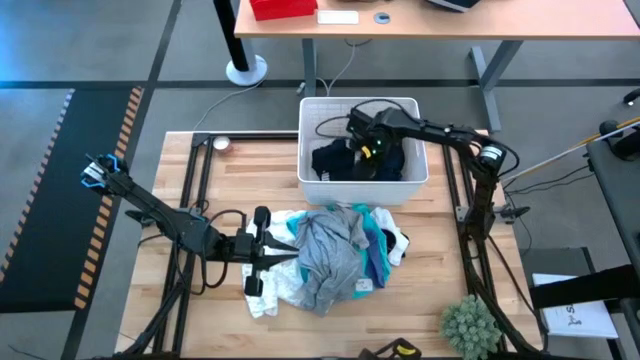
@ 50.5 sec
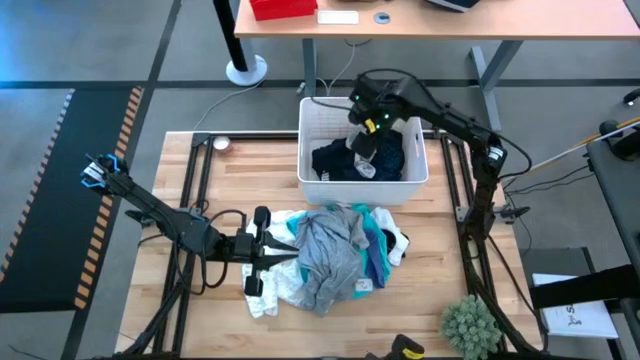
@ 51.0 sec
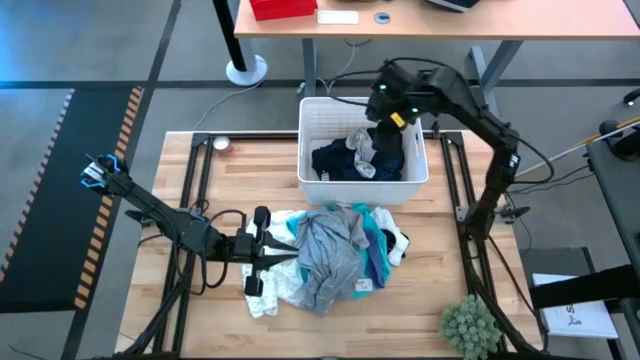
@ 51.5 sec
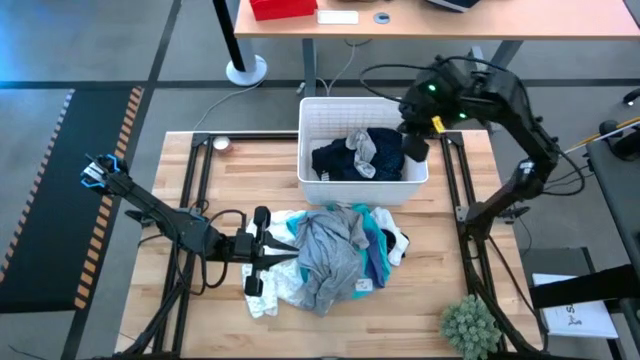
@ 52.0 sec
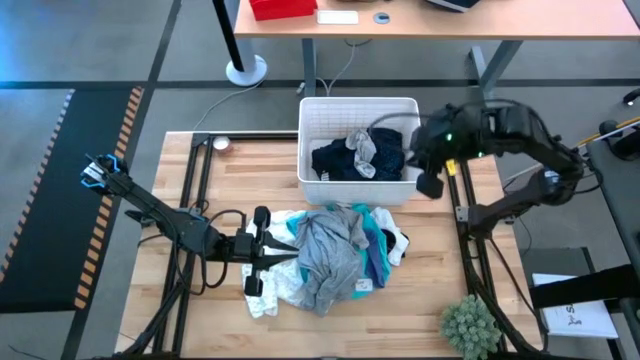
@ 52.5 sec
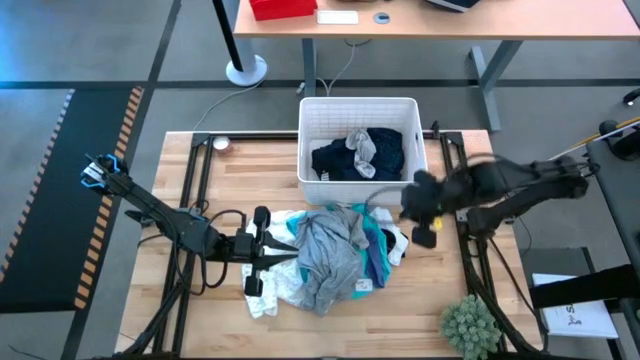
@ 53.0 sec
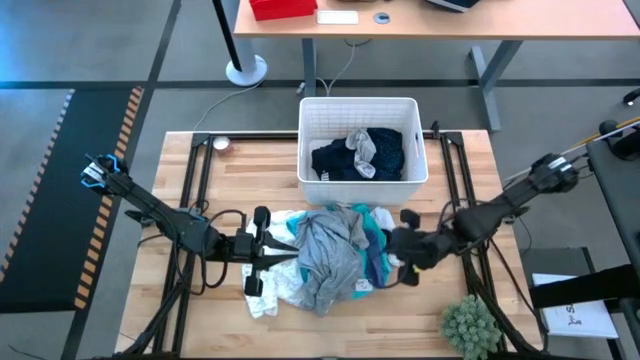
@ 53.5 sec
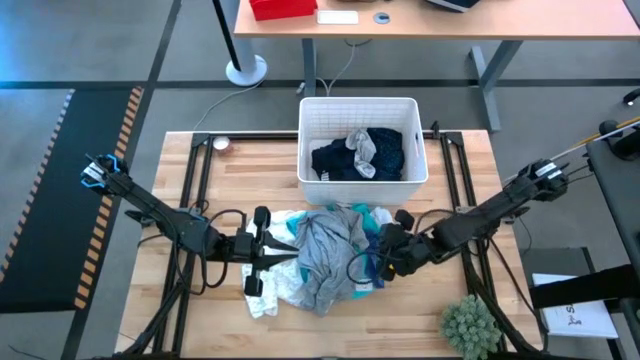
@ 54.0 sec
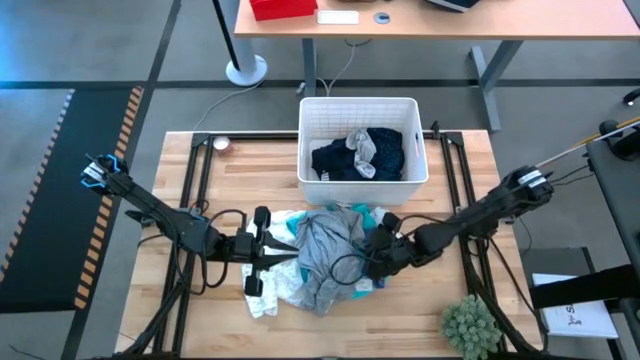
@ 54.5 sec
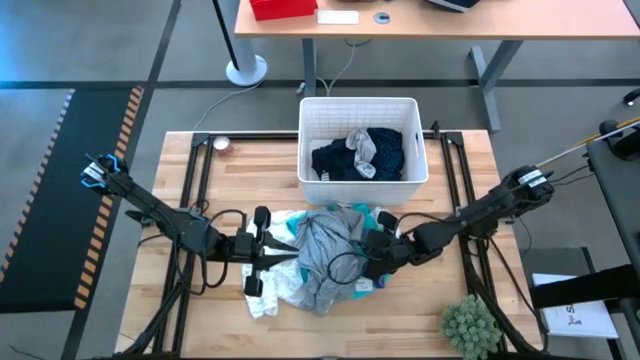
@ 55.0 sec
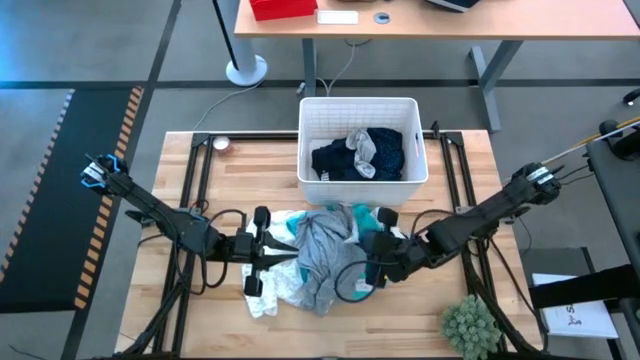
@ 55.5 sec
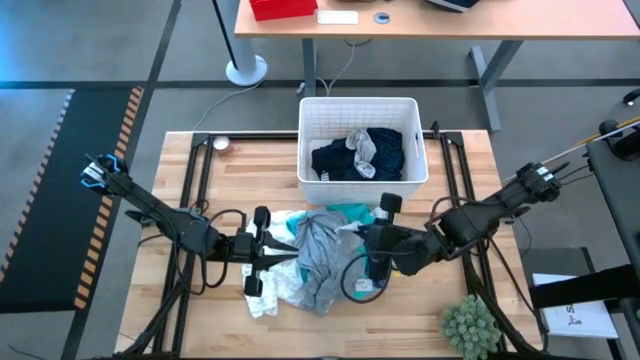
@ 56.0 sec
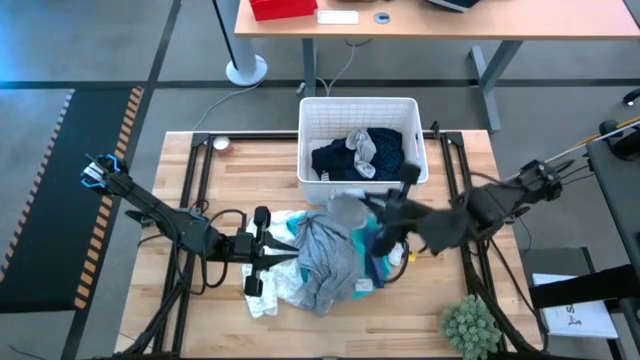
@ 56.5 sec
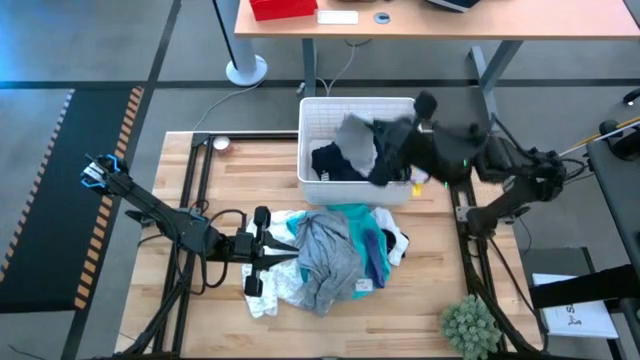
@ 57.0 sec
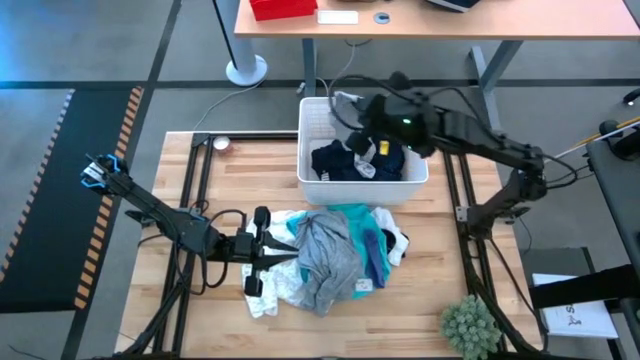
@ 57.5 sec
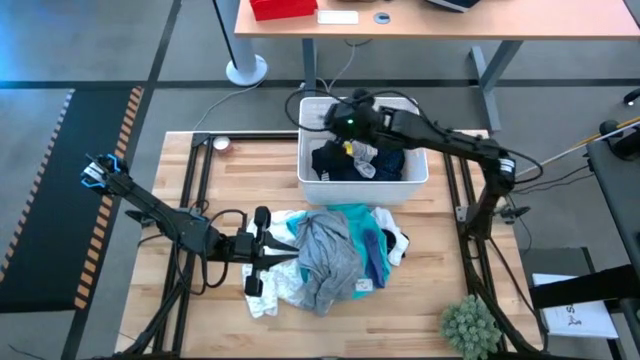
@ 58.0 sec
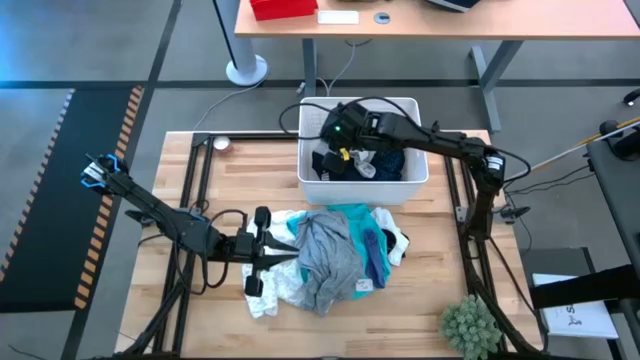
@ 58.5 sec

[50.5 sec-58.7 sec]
Task: Sort clothes
Put the gray sock in to the laundry bin

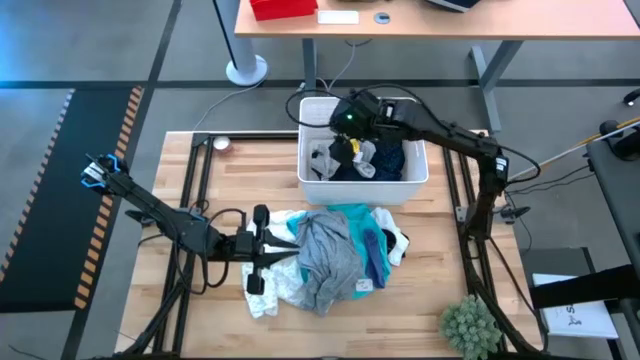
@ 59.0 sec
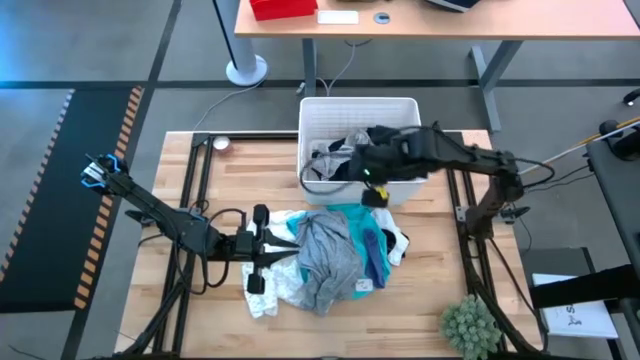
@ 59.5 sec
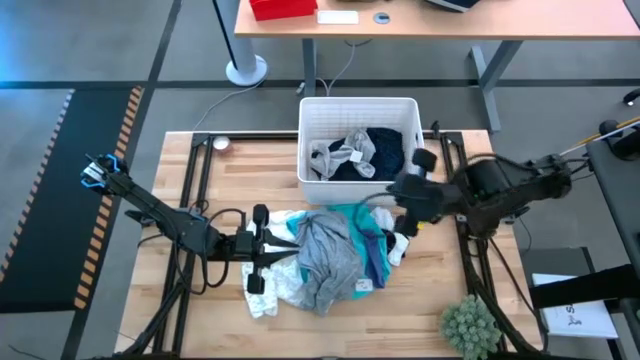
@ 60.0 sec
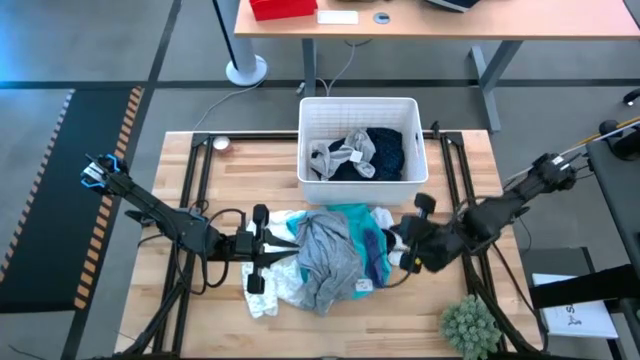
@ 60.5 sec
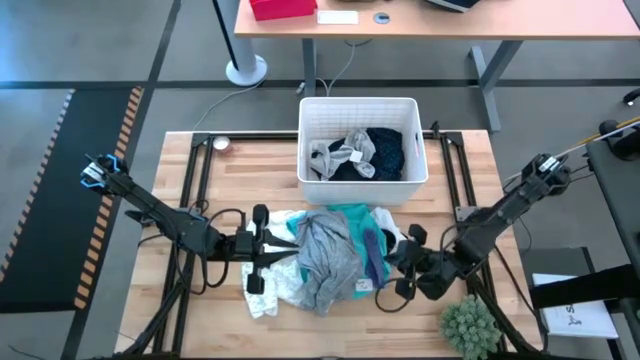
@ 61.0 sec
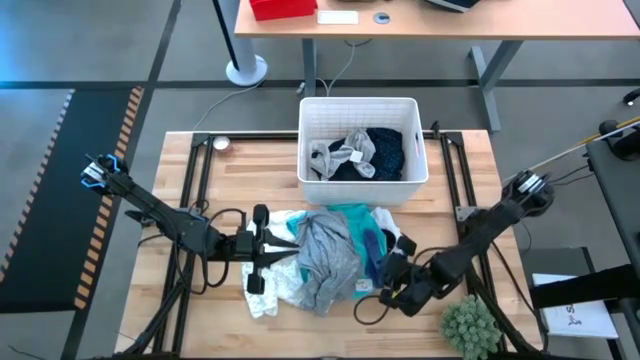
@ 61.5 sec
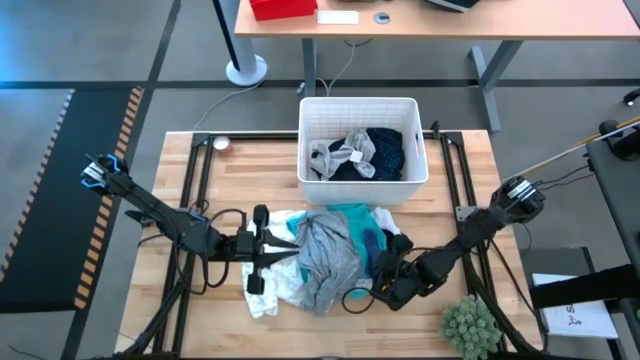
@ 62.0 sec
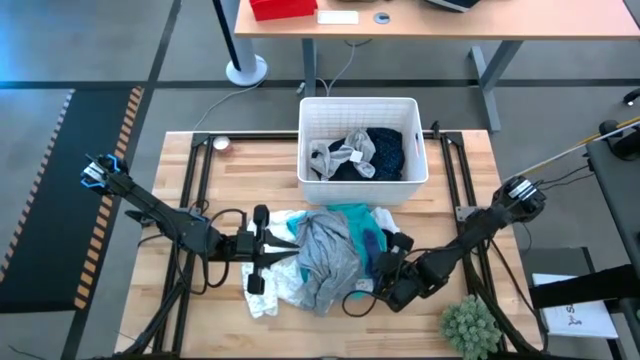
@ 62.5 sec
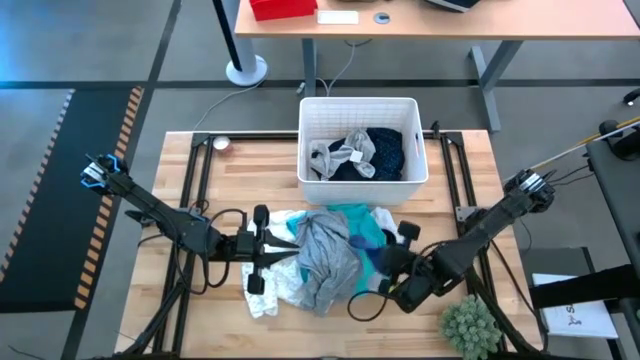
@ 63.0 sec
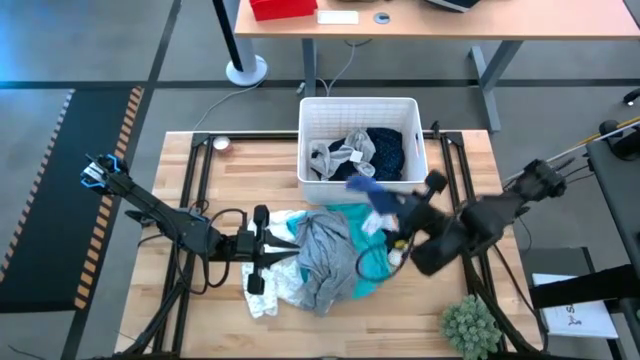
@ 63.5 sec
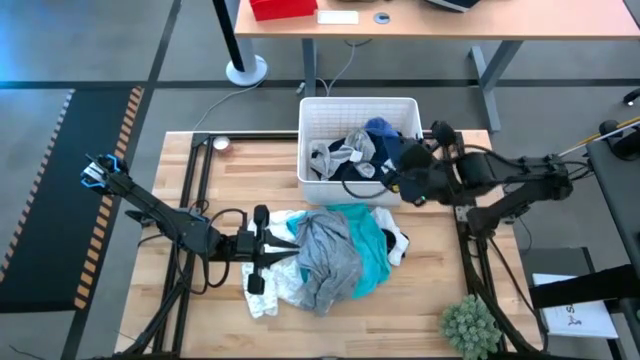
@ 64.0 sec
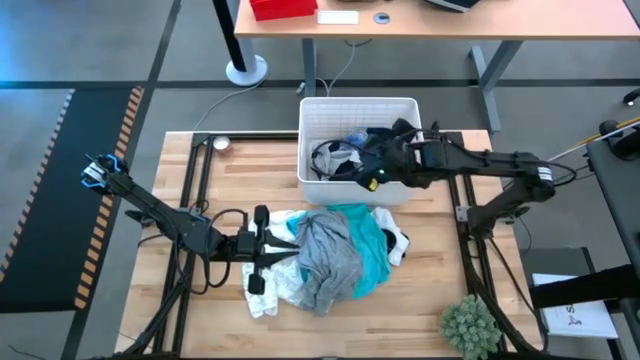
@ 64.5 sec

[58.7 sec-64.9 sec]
Put the purple sock into the white laundry bin

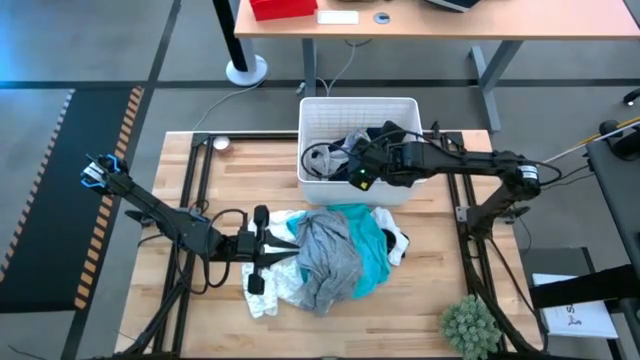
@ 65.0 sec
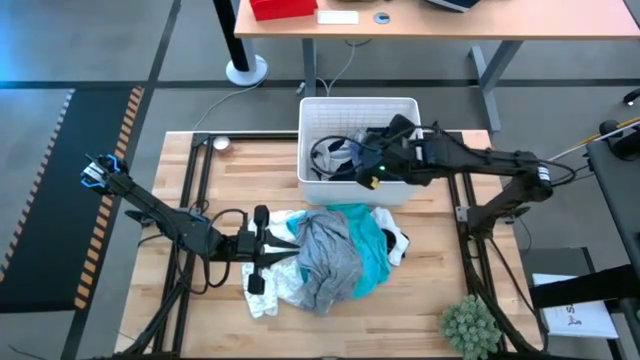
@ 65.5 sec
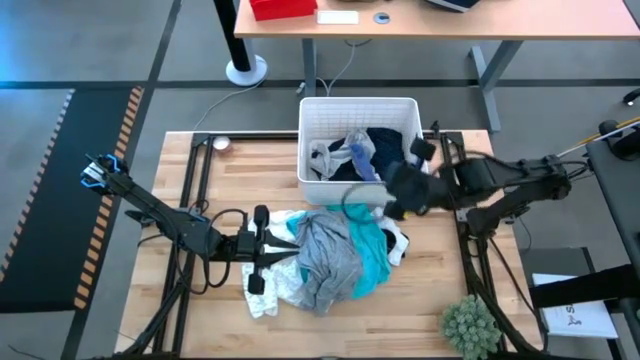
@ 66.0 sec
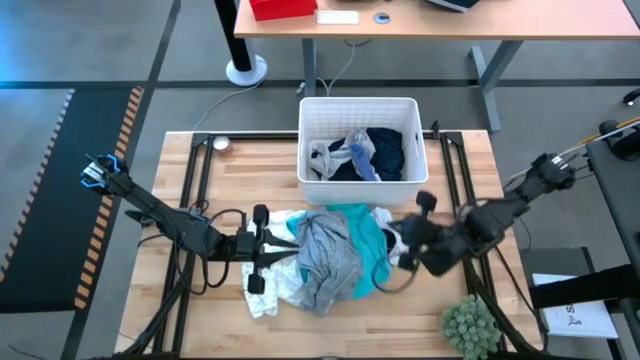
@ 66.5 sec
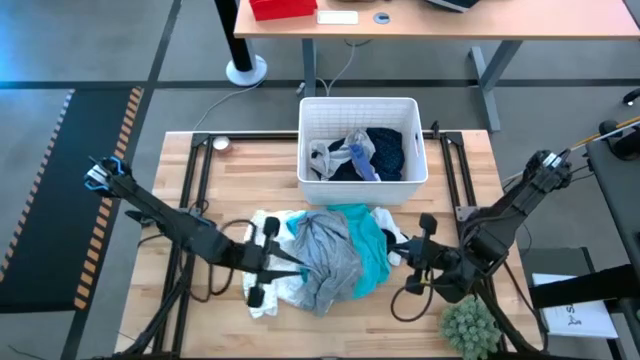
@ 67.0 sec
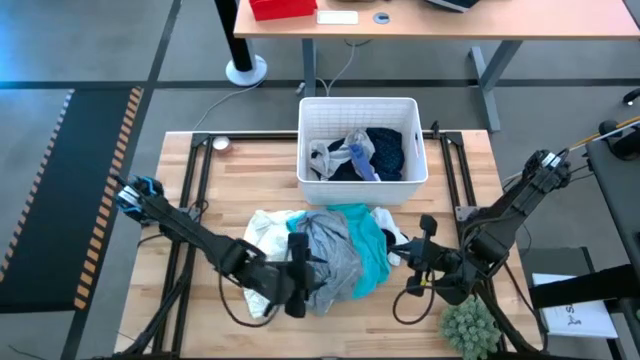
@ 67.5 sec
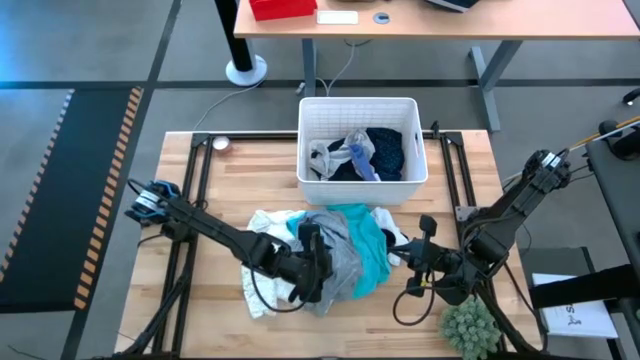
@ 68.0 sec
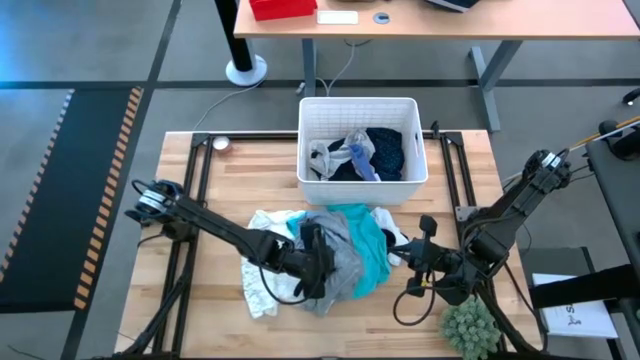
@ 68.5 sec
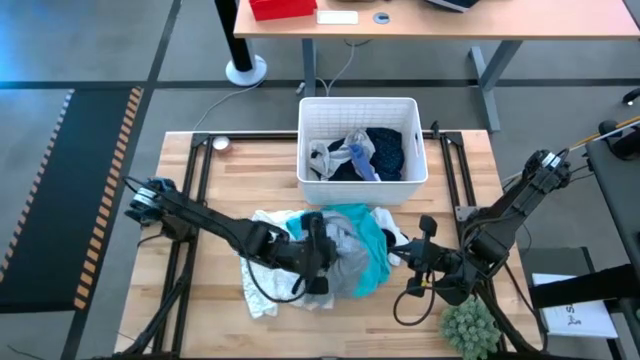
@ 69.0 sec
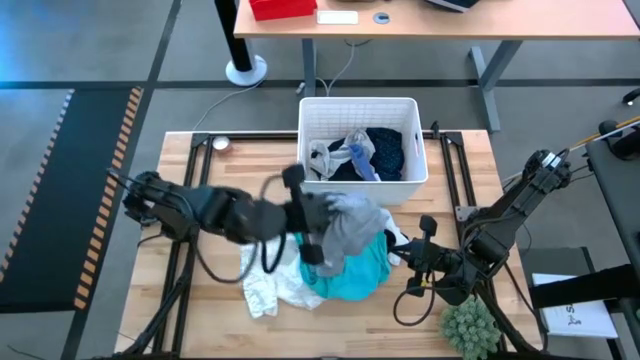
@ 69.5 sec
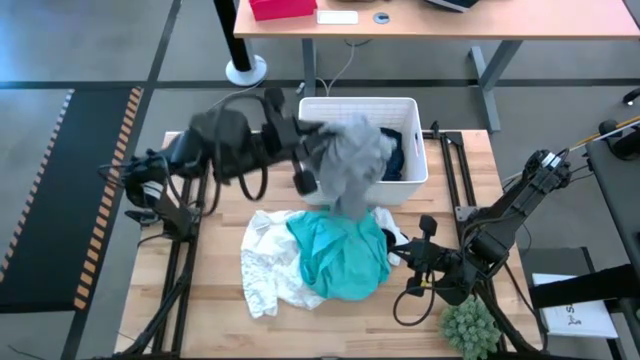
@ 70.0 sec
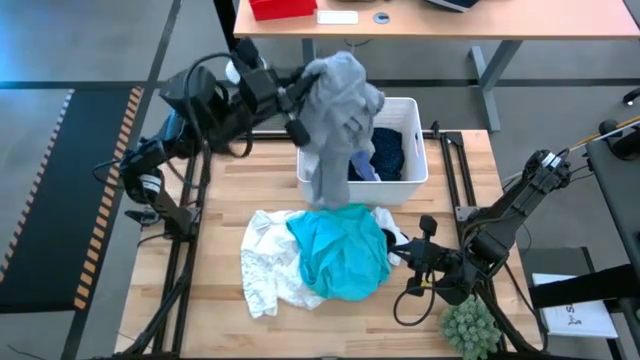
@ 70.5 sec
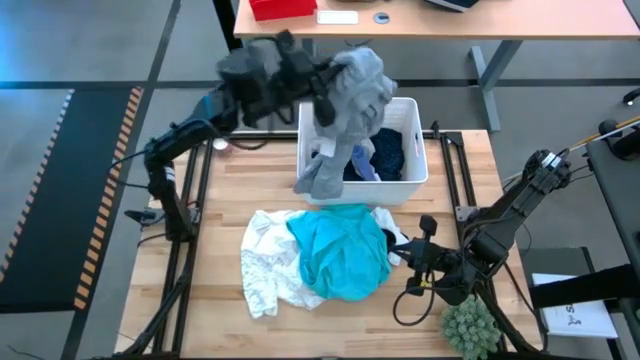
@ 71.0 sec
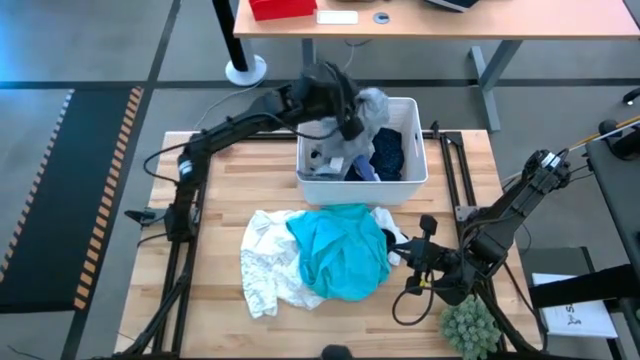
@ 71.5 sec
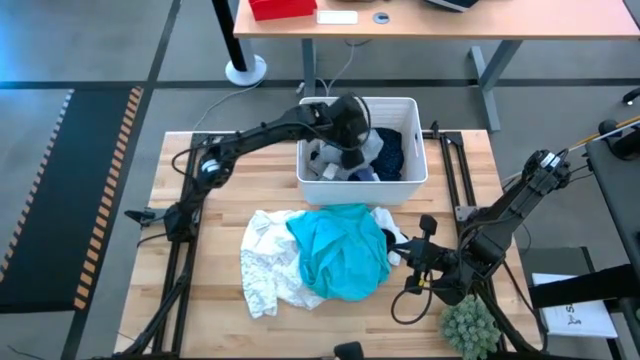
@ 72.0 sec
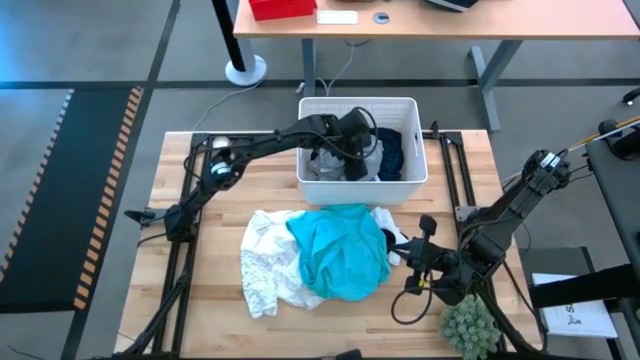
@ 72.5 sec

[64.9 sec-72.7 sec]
Put the gray shirt into the white laundry bin
